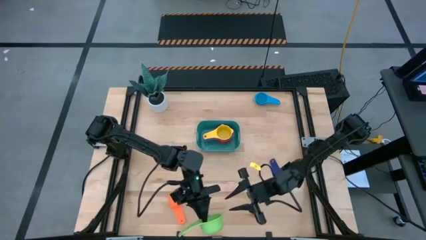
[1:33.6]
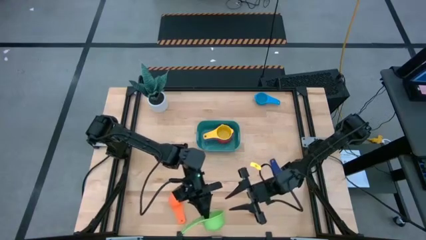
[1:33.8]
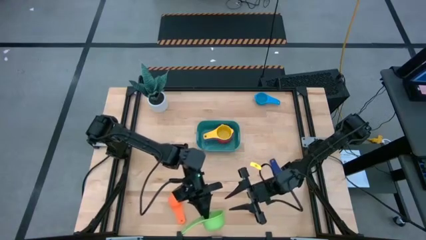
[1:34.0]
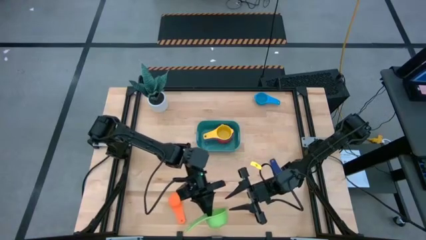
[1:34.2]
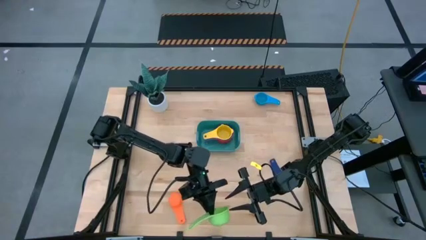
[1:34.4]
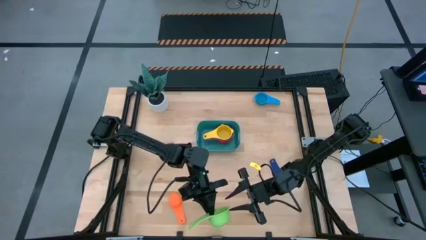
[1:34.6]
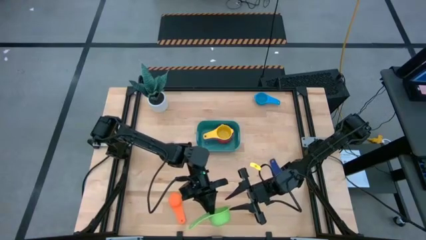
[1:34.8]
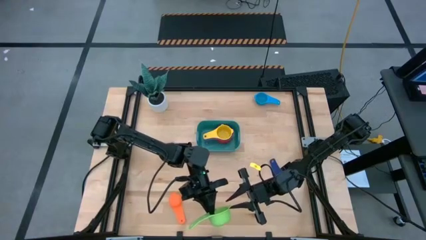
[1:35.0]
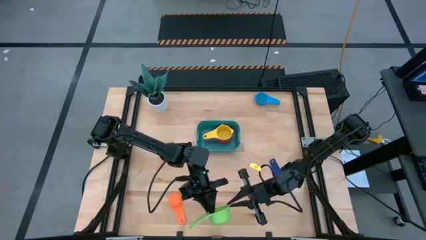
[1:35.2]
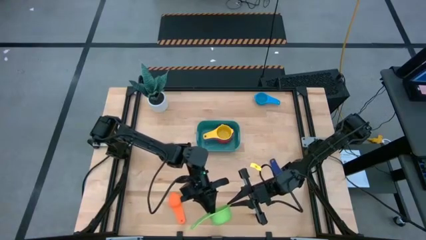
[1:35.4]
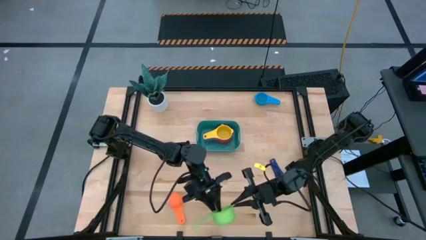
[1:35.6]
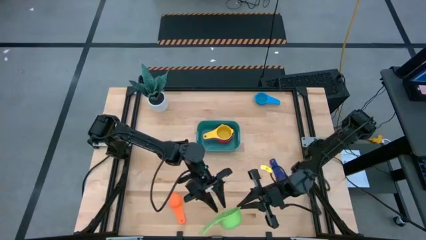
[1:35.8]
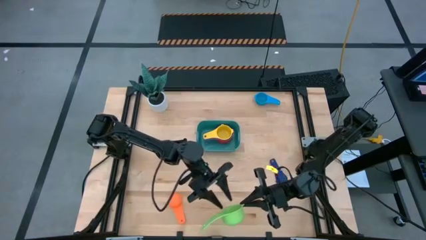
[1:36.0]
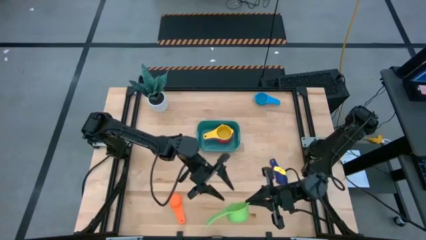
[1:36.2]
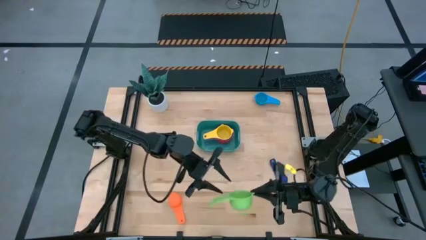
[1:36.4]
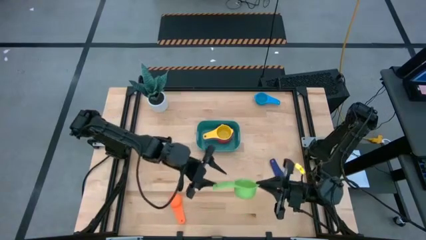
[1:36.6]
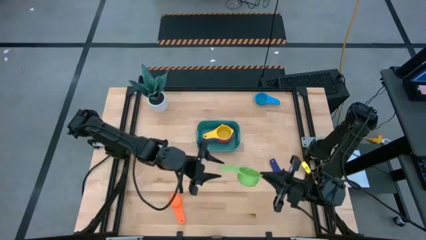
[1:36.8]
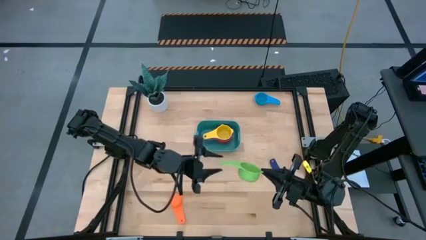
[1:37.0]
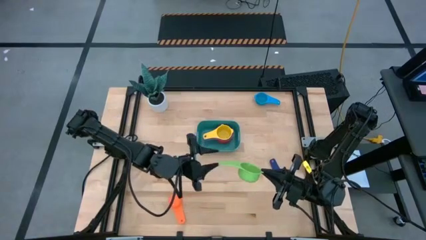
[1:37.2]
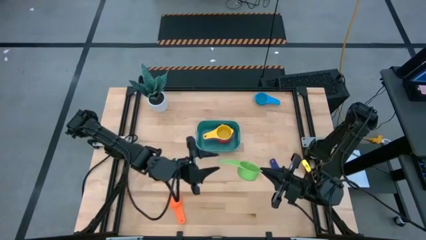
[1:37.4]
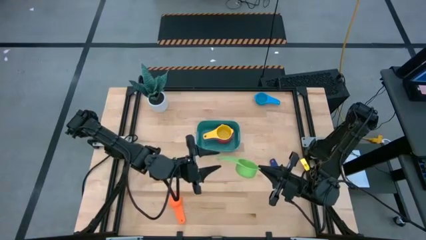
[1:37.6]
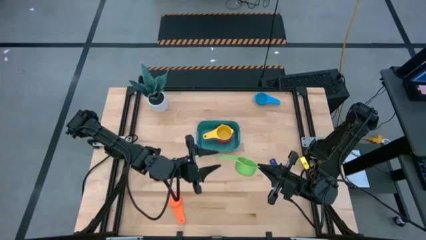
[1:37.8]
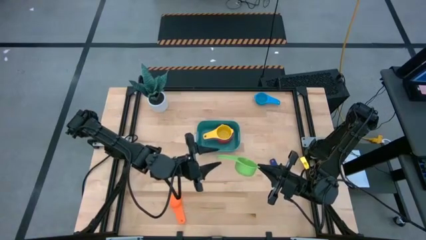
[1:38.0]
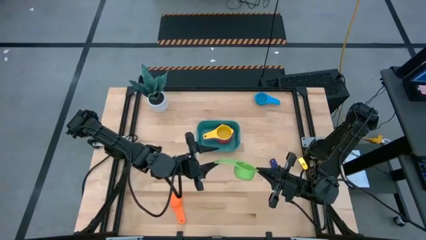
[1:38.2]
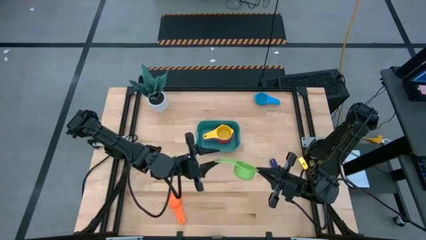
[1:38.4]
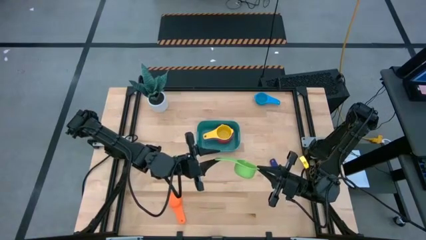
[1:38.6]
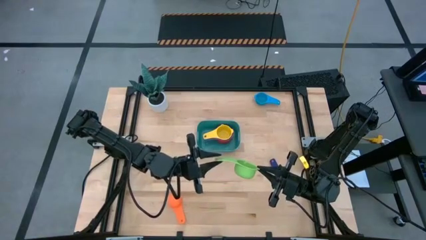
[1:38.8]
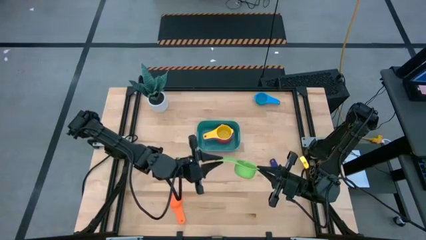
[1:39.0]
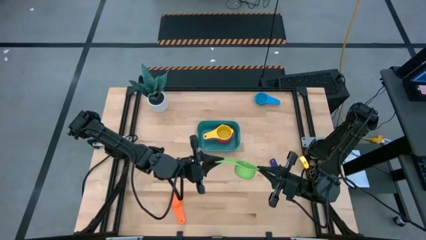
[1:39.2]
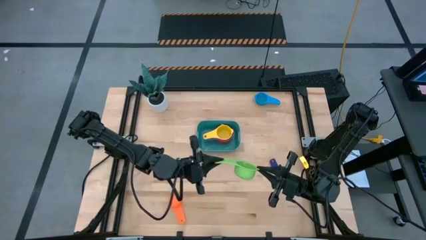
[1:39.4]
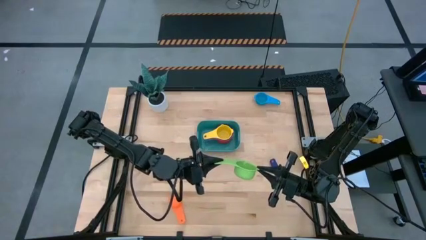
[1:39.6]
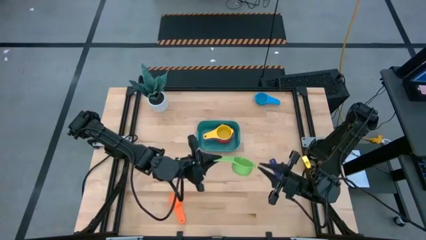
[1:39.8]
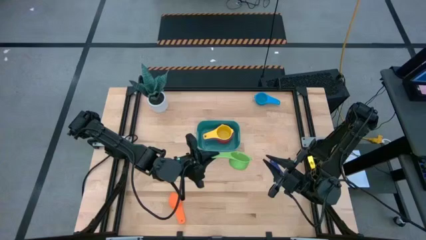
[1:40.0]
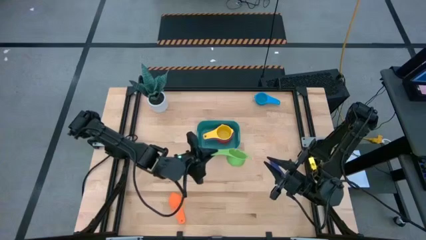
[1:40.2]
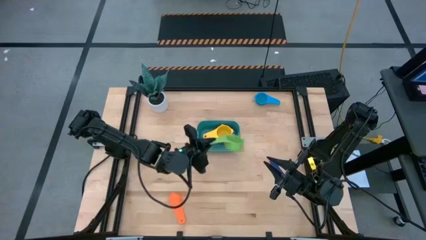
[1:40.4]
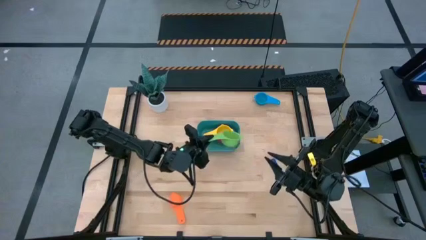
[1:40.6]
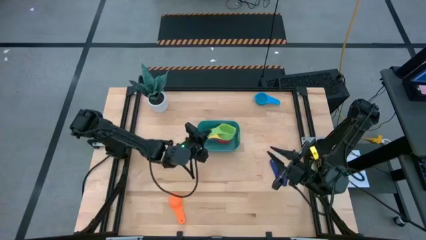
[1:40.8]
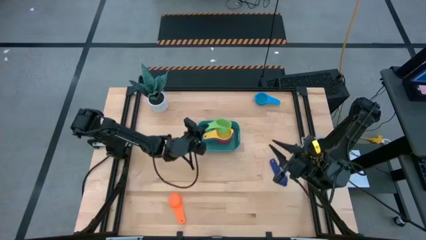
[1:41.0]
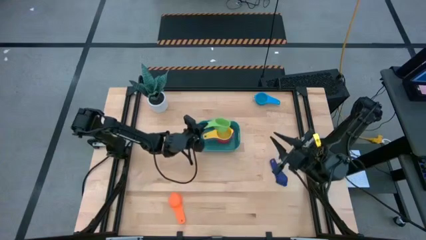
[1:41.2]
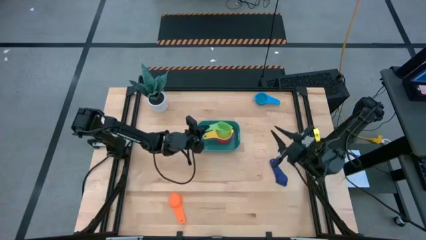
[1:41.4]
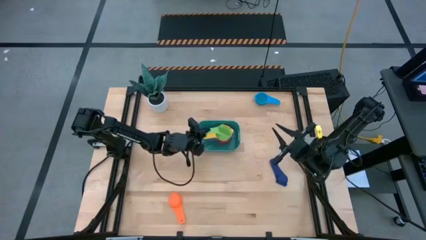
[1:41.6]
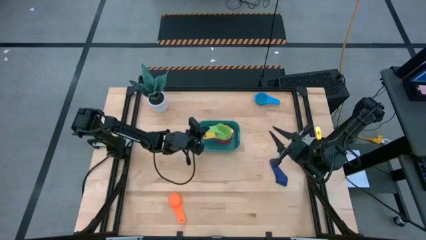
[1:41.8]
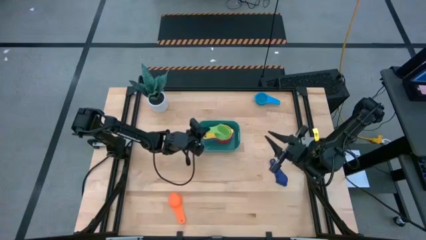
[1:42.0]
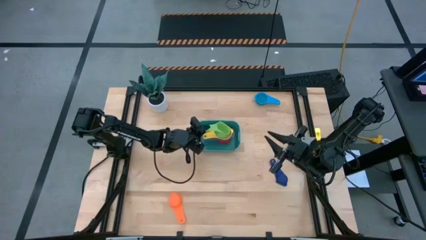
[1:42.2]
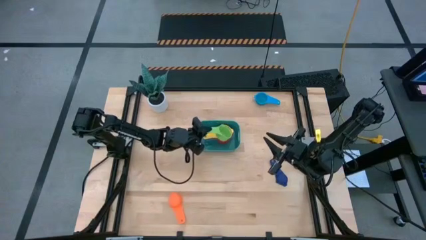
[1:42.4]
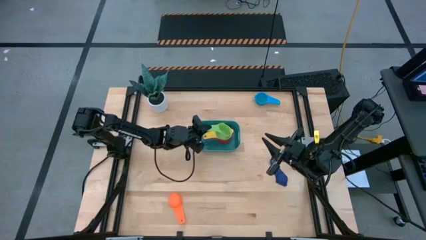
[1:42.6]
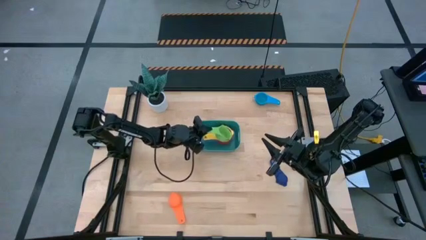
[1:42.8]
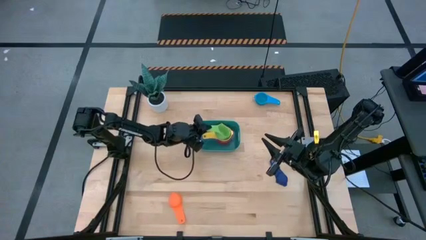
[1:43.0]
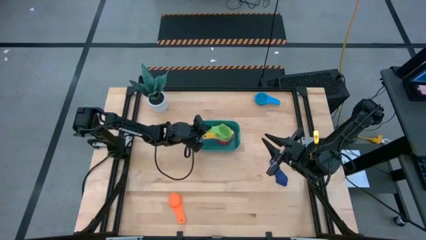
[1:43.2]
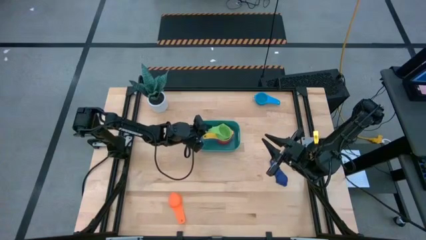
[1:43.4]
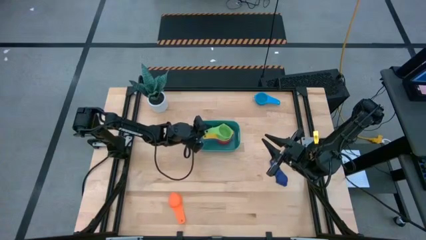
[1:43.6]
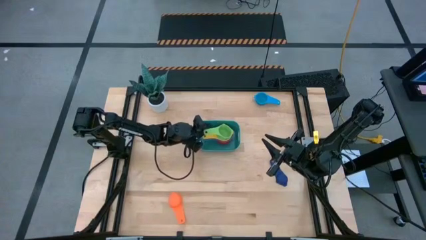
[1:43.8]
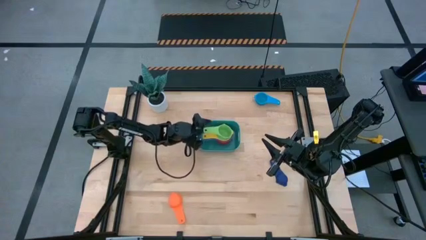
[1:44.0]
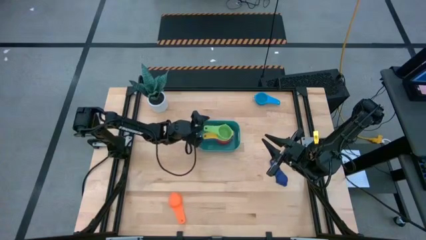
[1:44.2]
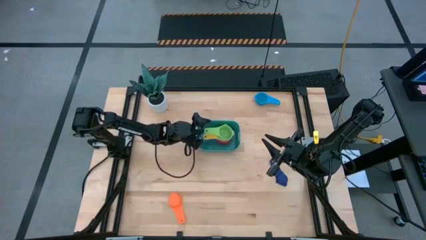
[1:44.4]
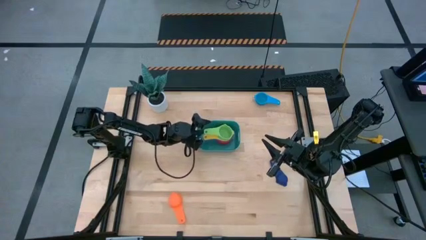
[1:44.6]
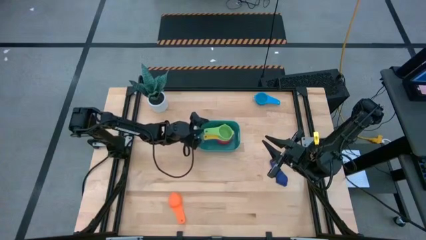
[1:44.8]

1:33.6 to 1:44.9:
Task: Nest measuring cups in basket
Stack the green measuring cup on top of the yellow measuring cup inside the light blue bin

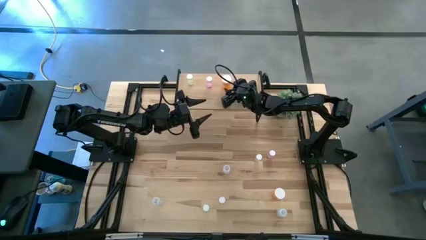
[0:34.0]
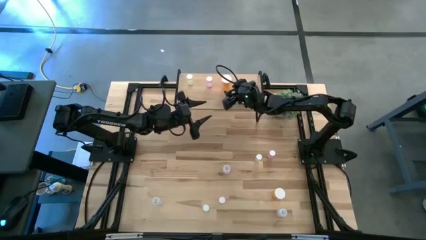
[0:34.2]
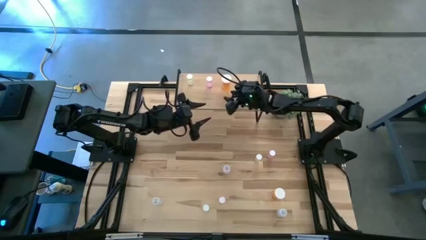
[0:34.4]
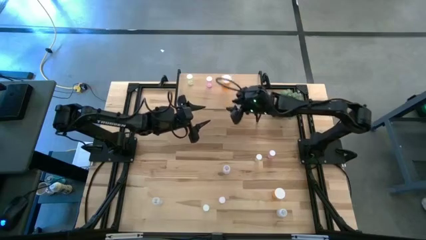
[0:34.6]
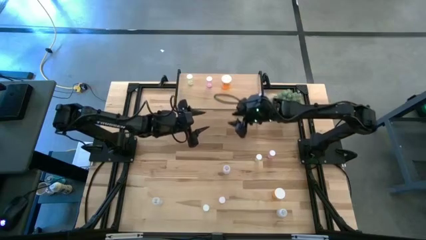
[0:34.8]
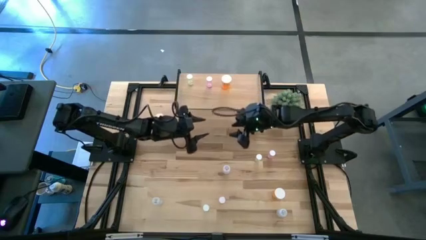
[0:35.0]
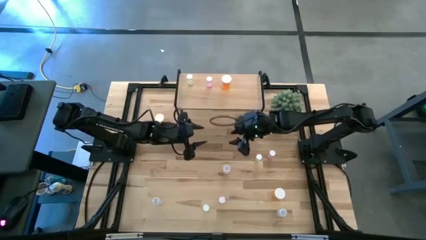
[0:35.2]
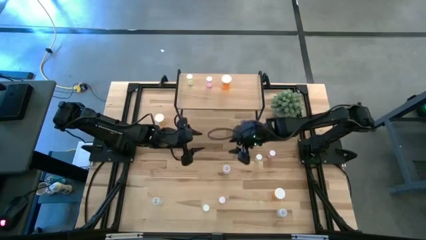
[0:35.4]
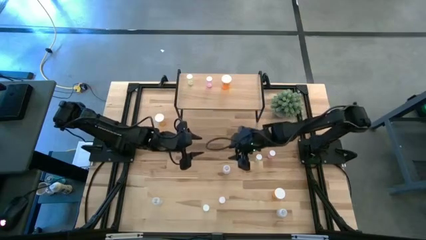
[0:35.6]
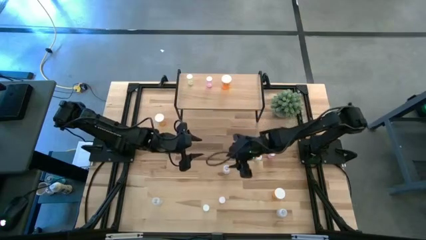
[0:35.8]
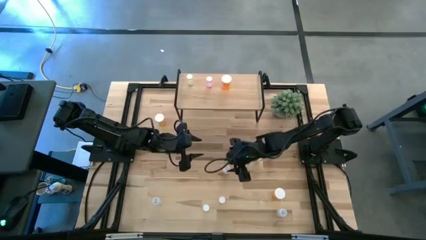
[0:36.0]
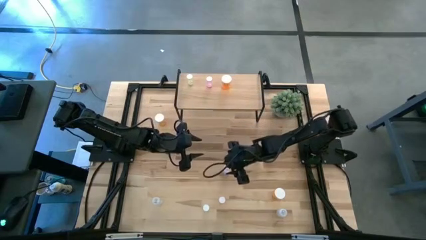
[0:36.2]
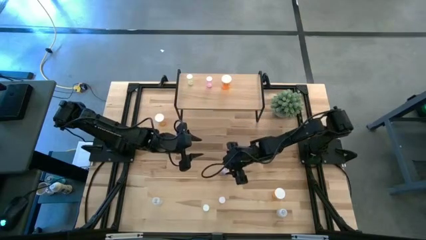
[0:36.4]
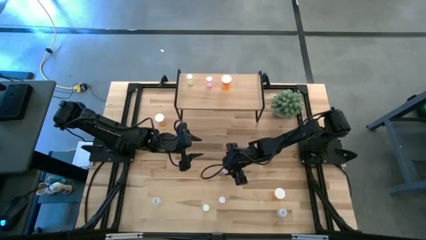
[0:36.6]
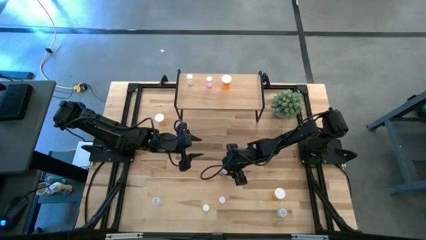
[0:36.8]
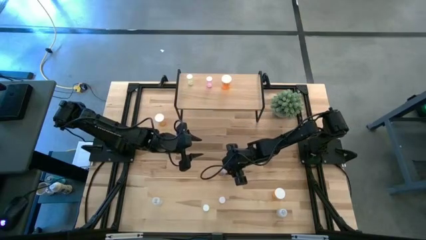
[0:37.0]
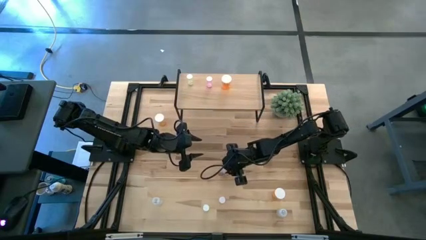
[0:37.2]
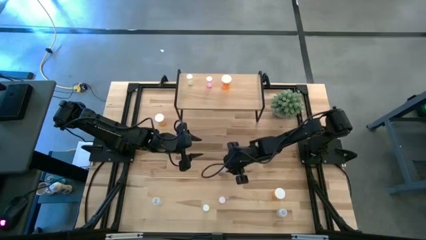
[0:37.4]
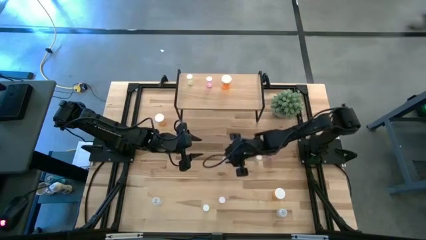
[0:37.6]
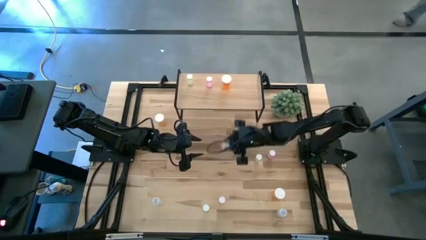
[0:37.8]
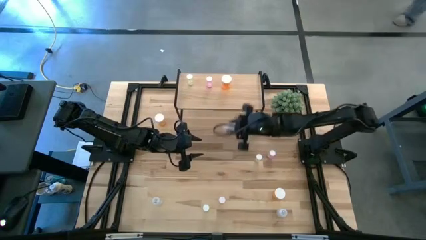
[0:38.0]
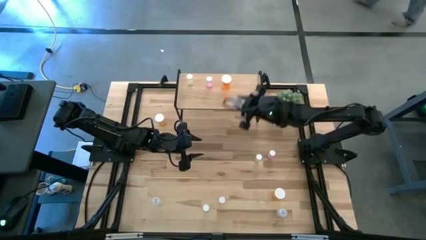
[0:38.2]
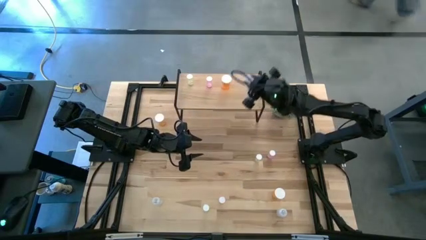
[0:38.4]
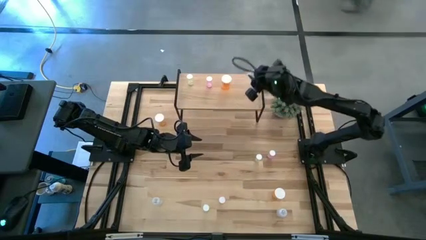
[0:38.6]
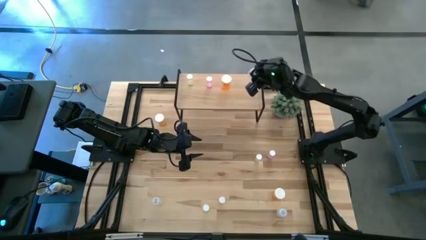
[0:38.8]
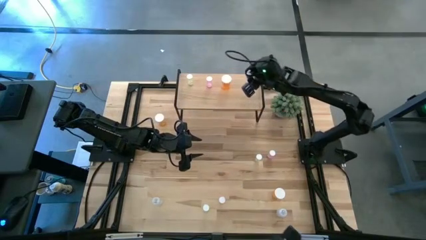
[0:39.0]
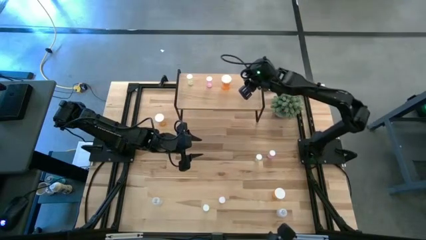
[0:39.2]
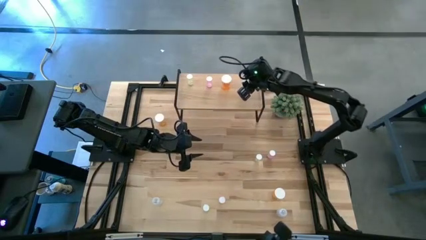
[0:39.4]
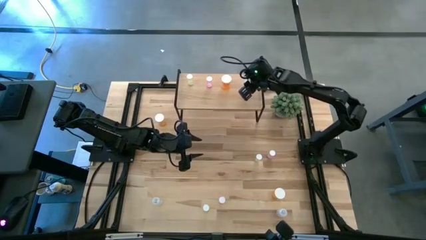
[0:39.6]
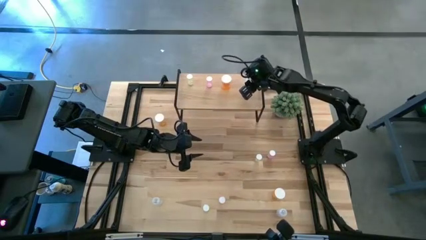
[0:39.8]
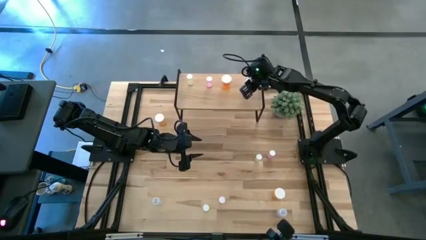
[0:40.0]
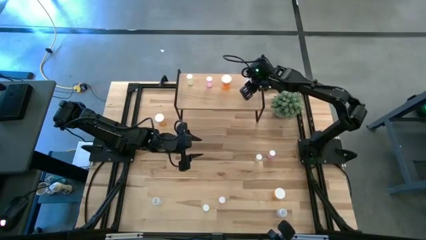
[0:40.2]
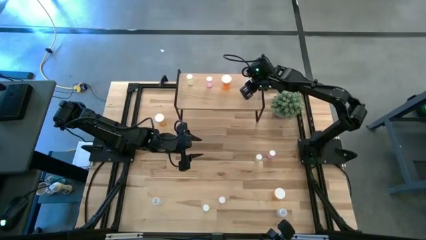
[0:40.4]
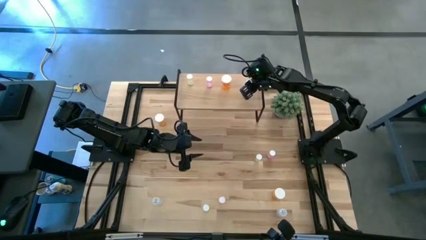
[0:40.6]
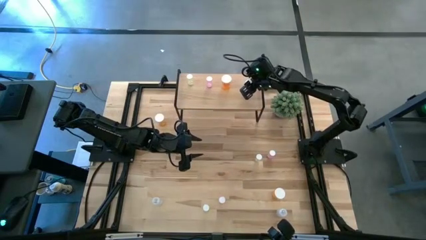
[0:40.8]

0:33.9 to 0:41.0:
Task: Pick and place medicine bottles onto shelf by color
Put the top transparent pill bottle on the shelf
